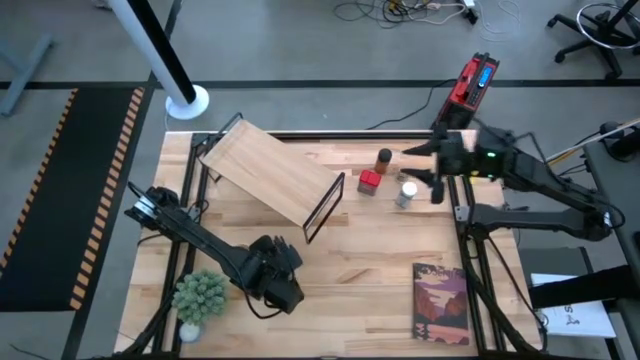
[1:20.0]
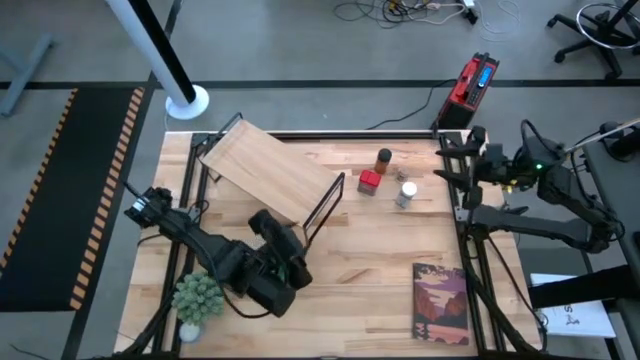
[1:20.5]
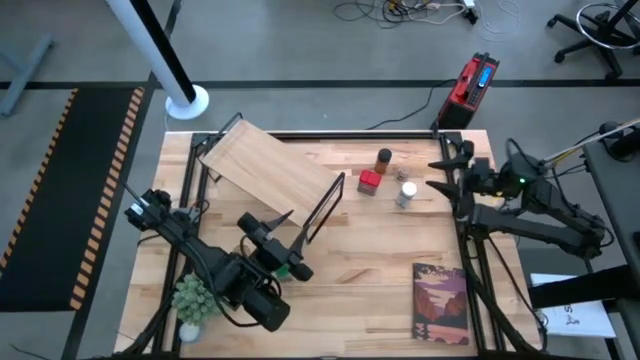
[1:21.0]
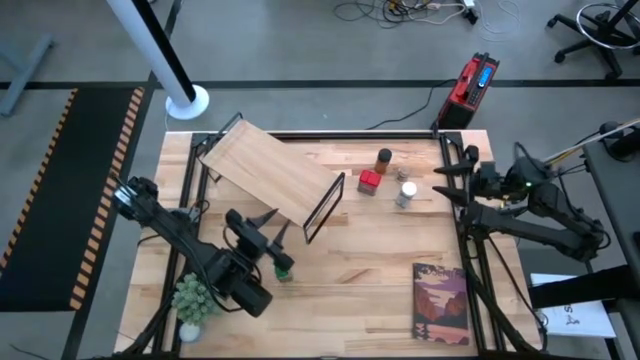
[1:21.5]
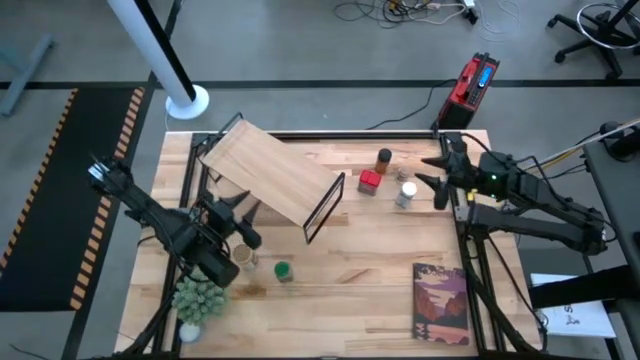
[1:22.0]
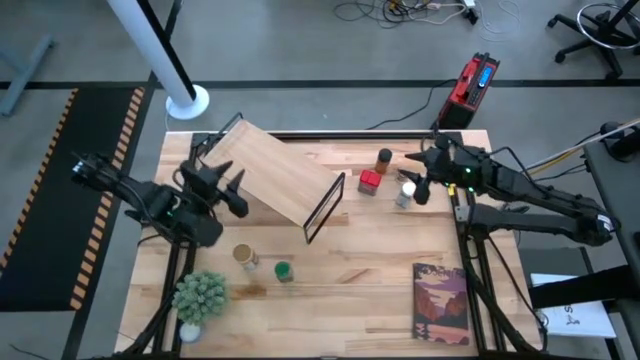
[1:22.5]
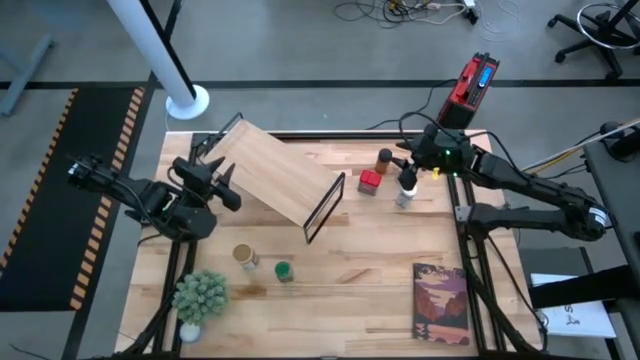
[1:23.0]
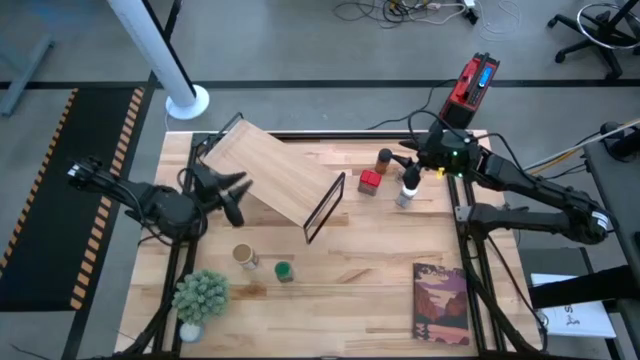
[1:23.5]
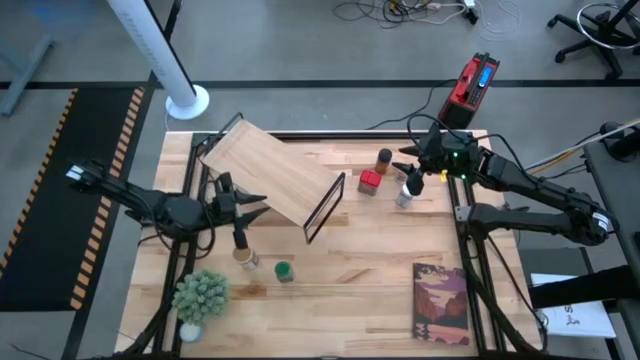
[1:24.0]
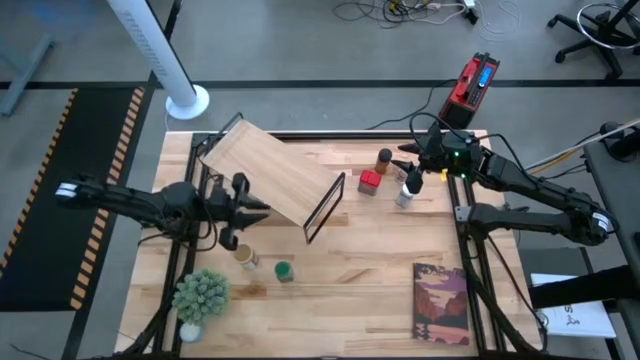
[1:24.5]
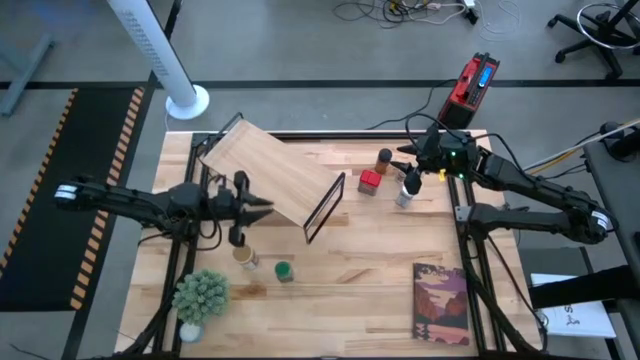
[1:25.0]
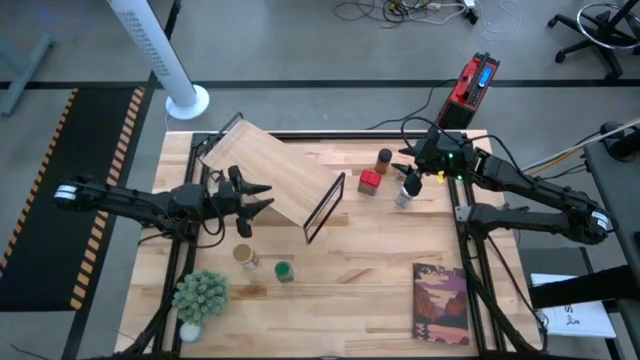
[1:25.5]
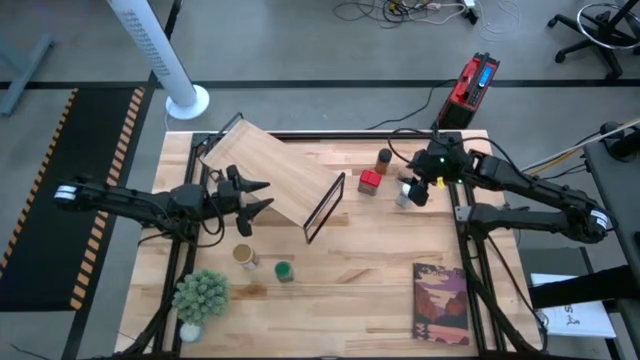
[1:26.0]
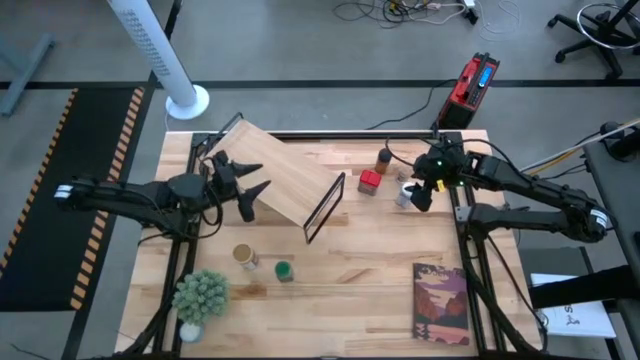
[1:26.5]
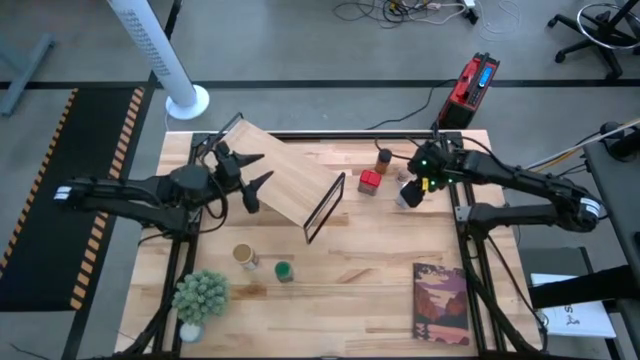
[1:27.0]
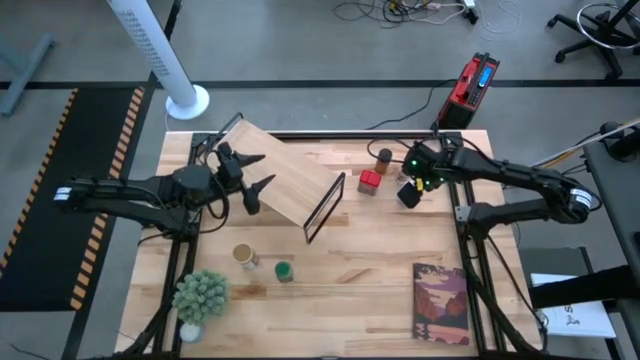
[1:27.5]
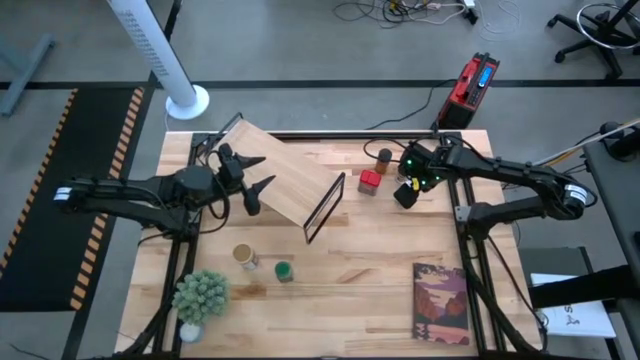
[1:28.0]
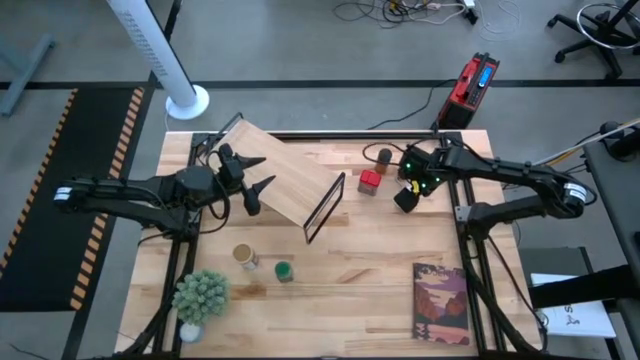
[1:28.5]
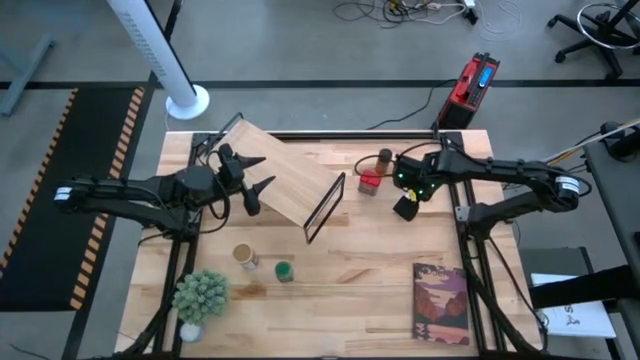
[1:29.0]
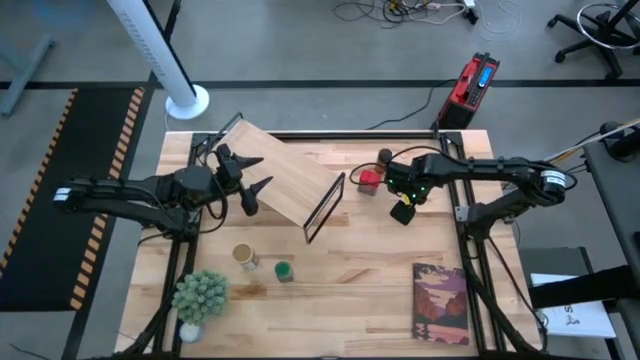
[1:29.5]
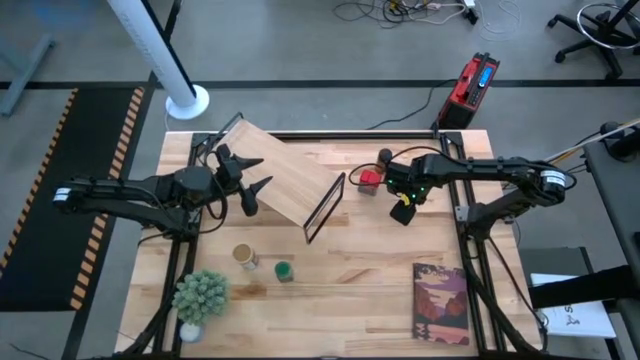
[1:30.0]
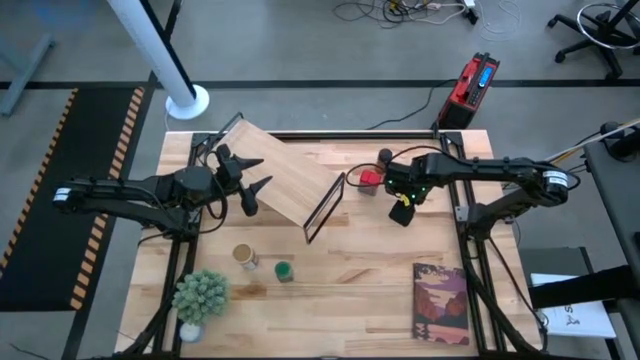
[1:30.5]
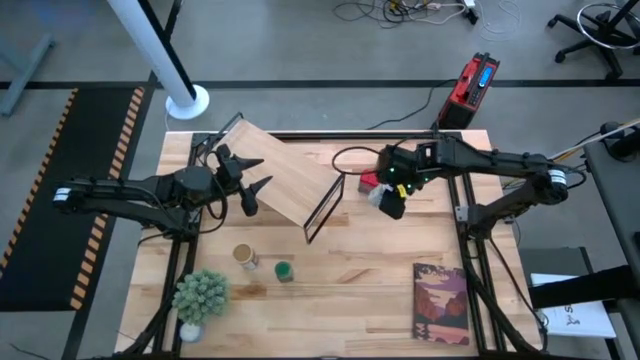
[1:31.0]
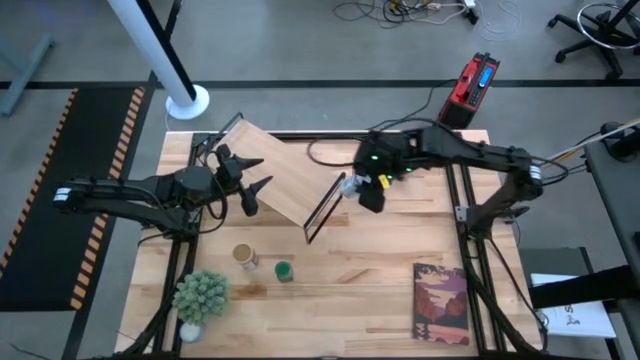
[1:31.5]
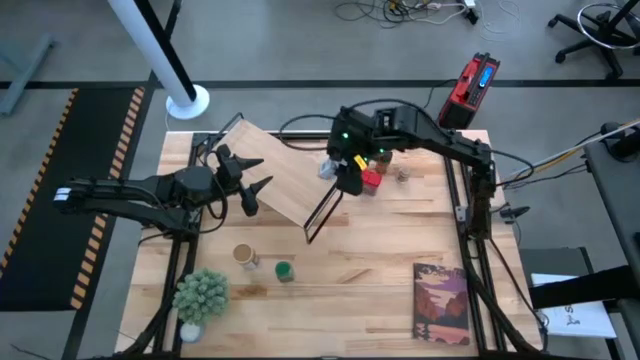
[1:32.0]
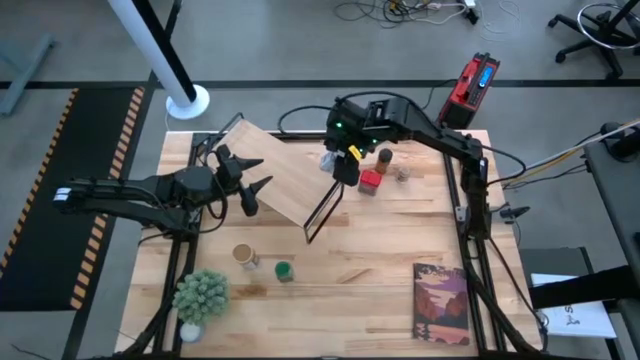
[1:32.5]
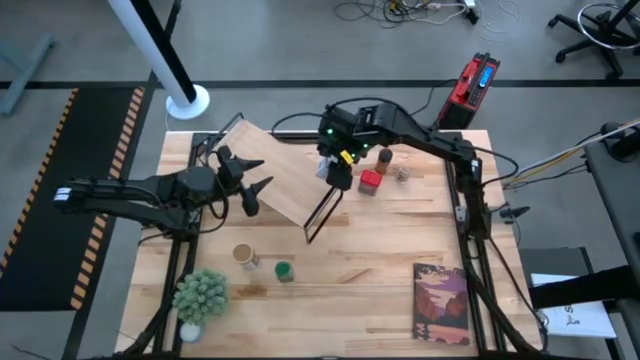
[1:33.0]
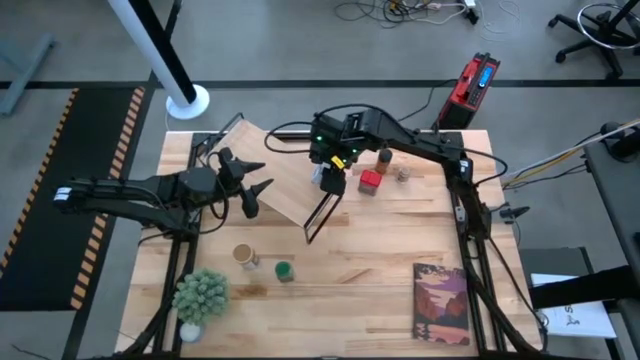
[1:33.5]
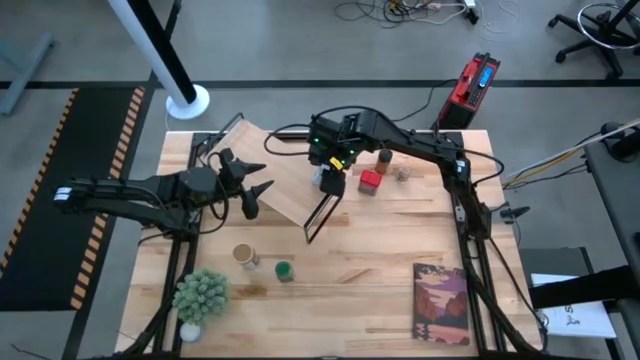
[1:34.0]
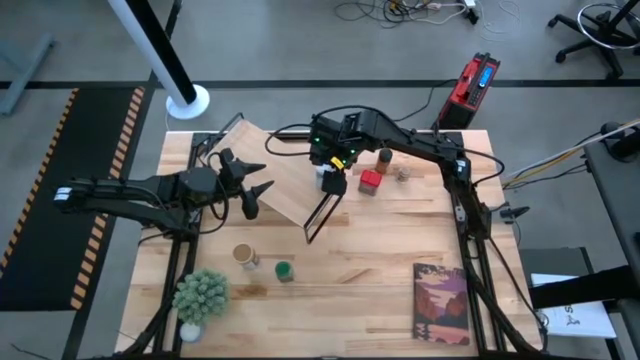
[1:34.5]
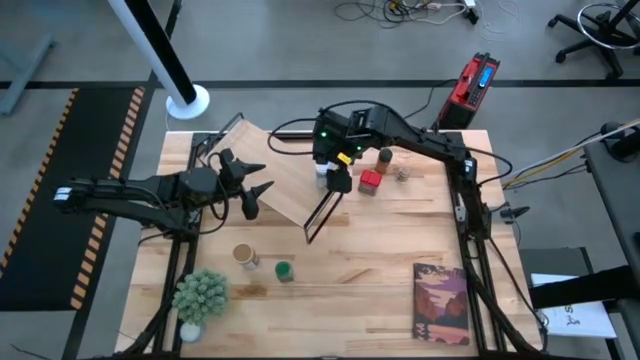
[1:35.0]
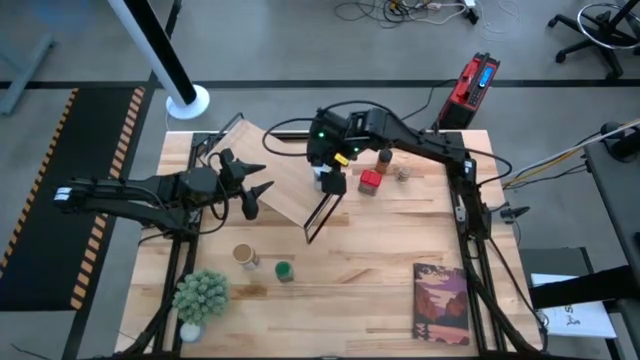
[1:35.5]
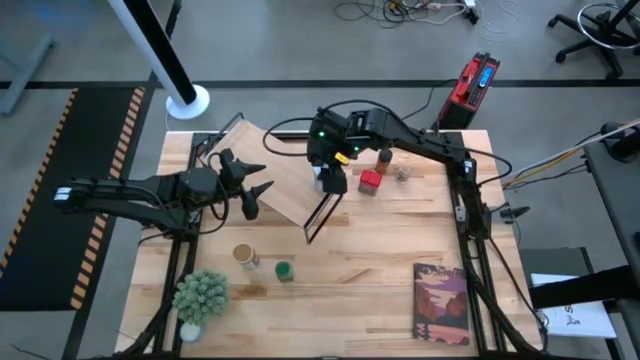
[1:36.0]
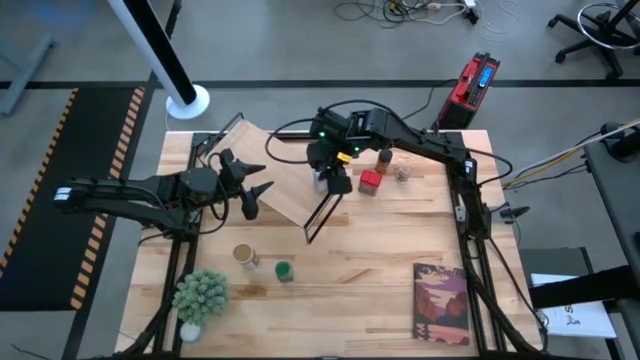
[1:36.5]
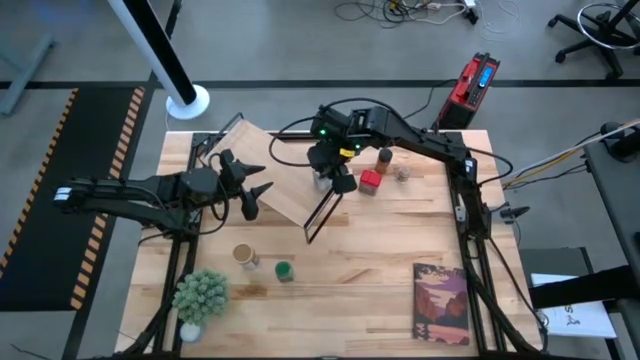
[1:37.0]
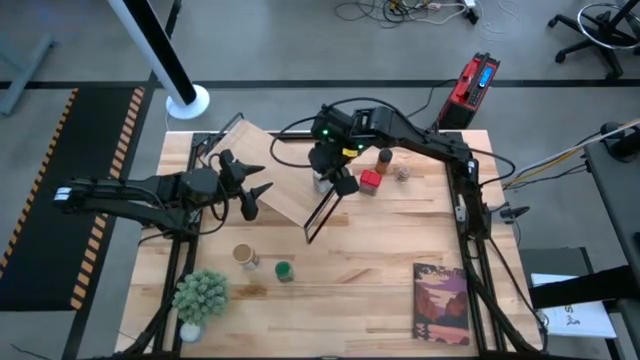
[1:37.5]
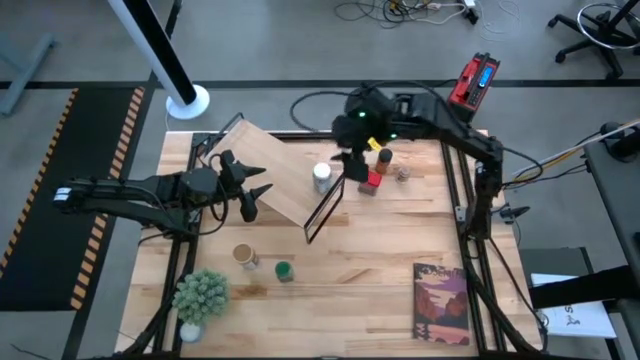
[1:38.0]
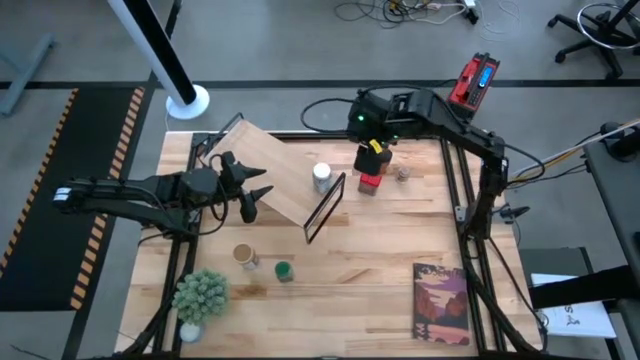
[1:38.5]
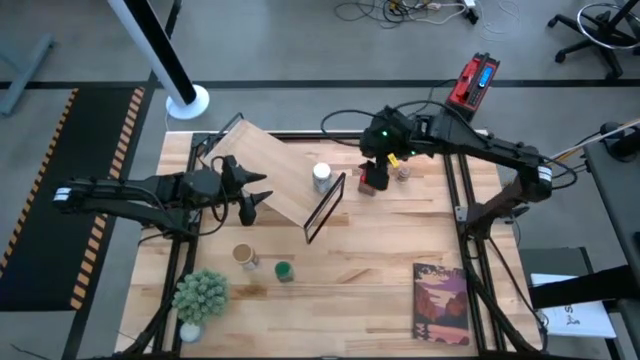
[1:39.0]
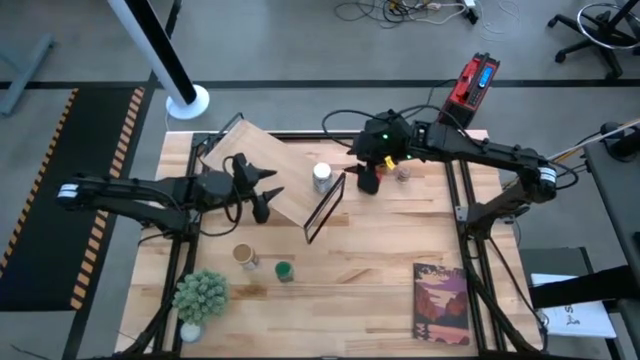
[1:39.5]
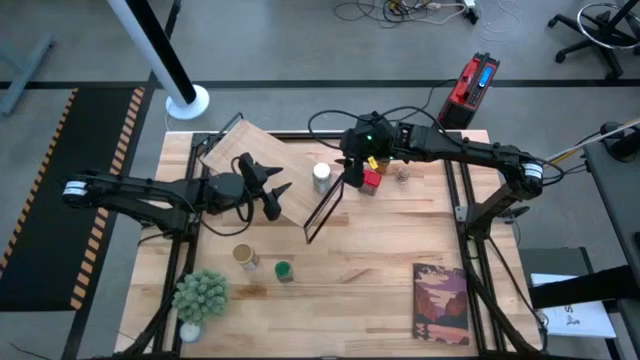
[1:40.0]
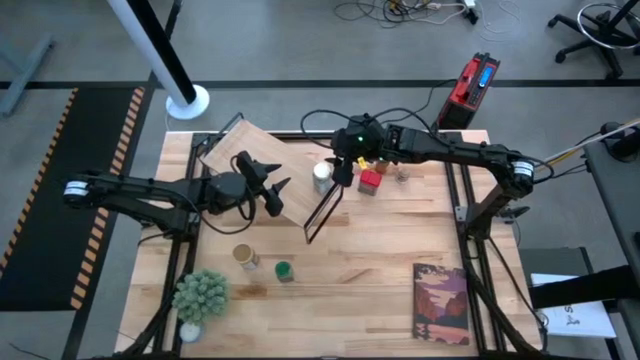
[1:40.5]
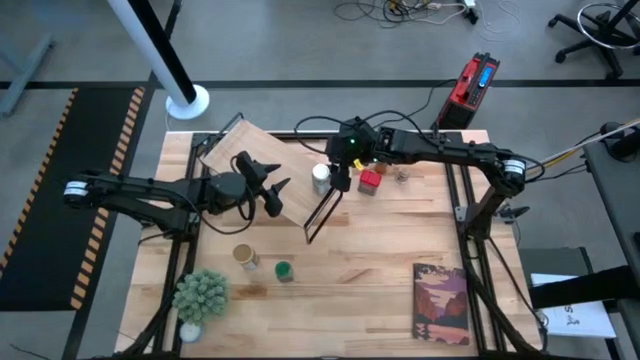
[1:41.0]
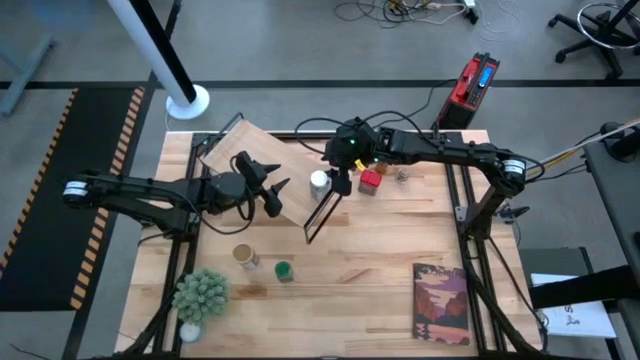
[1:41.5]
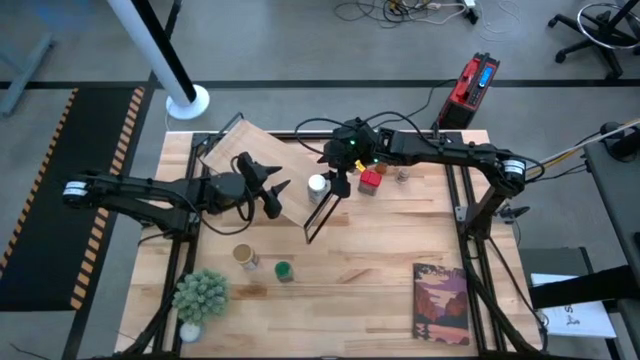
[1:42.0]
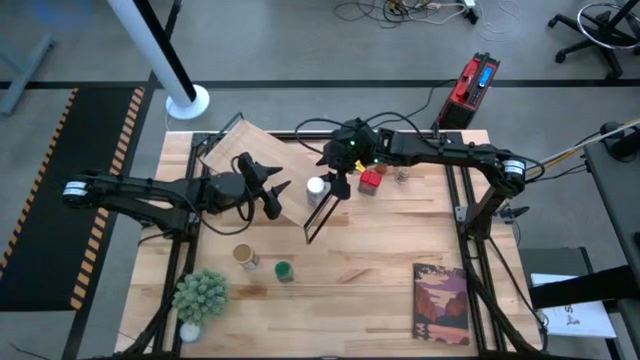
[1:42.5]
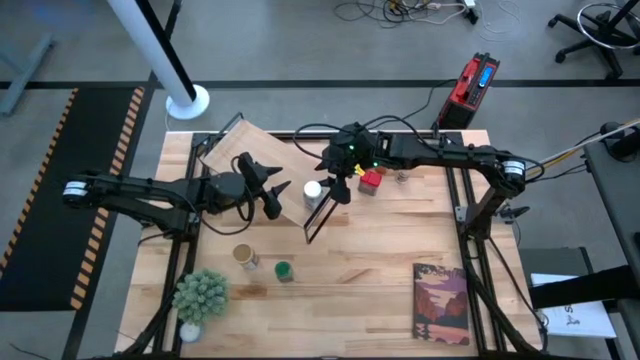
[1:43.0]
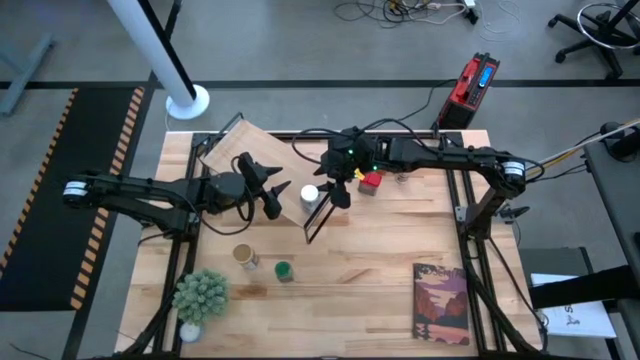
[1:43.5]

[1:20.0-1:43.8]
Task: Shelf spices
Put the white seasoning bottle on the shelf
